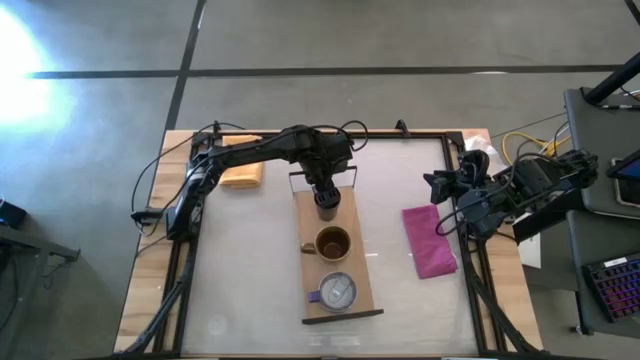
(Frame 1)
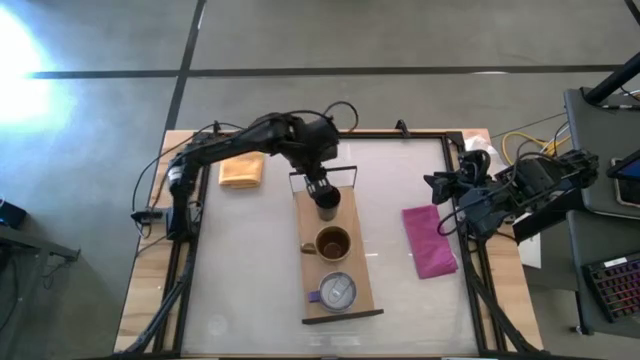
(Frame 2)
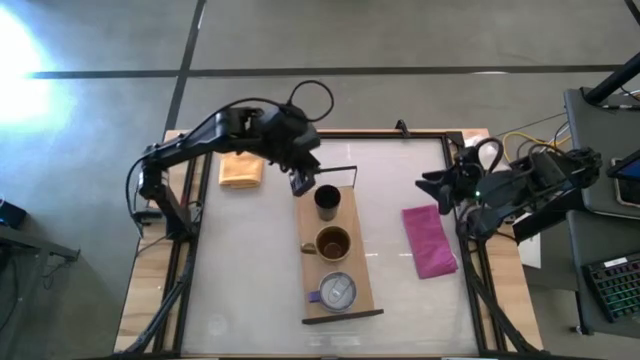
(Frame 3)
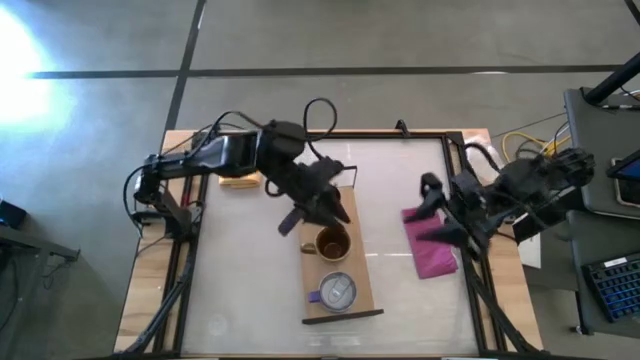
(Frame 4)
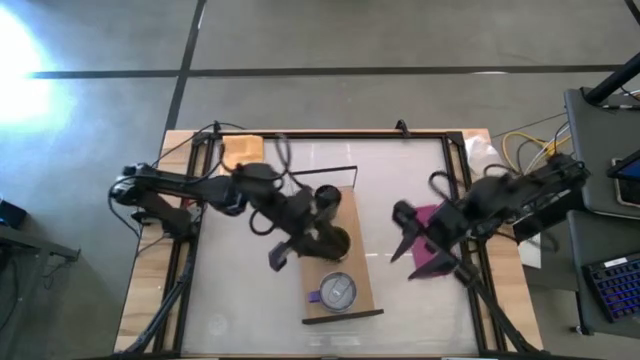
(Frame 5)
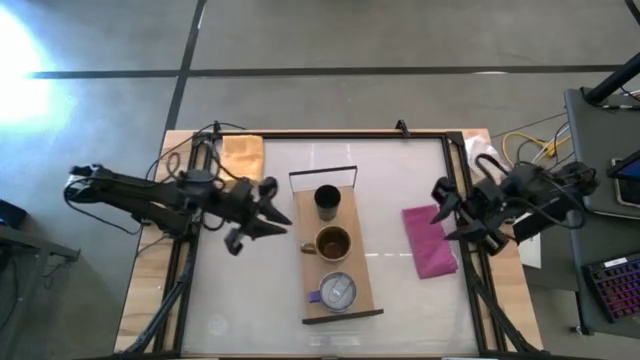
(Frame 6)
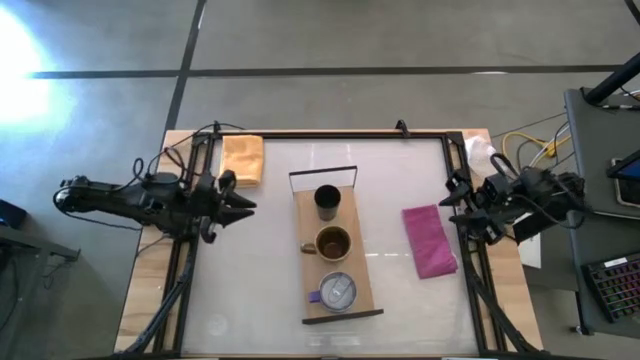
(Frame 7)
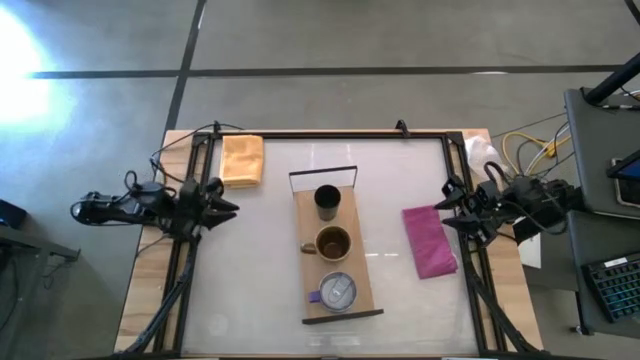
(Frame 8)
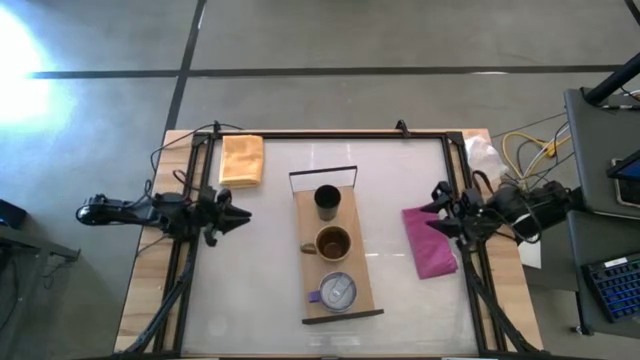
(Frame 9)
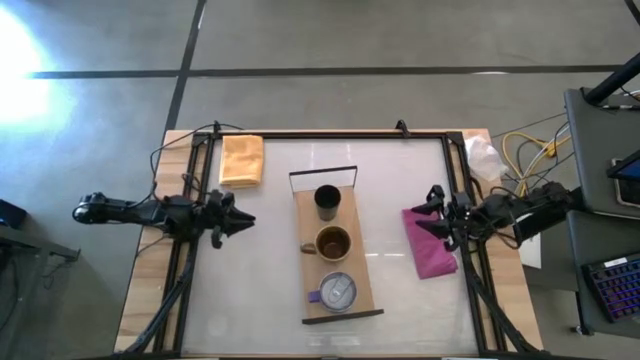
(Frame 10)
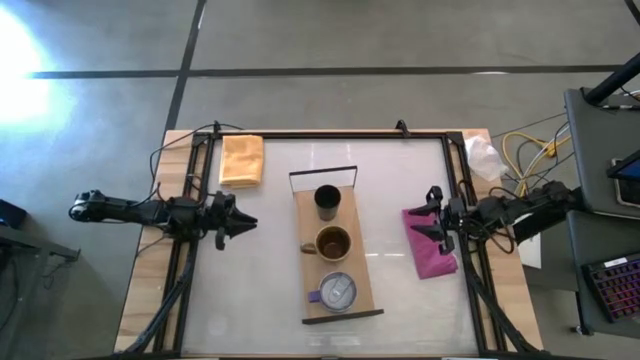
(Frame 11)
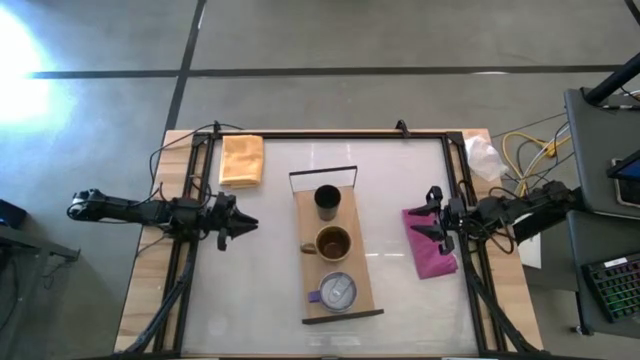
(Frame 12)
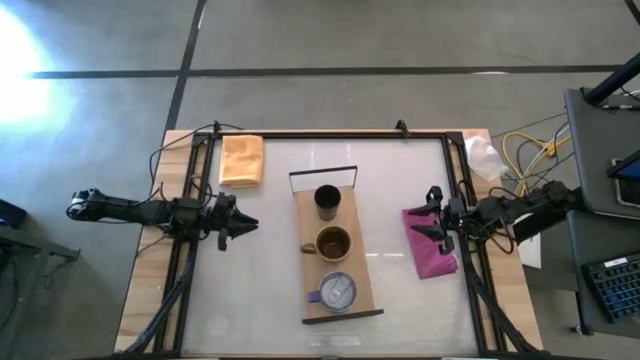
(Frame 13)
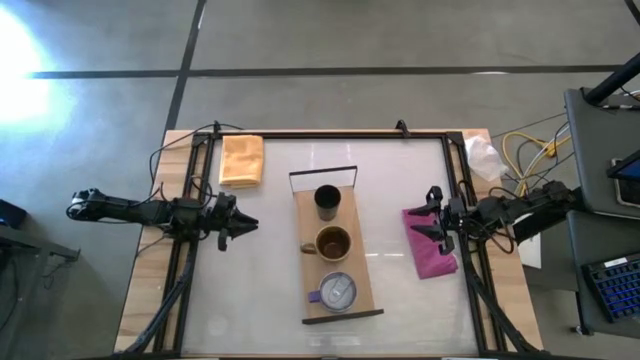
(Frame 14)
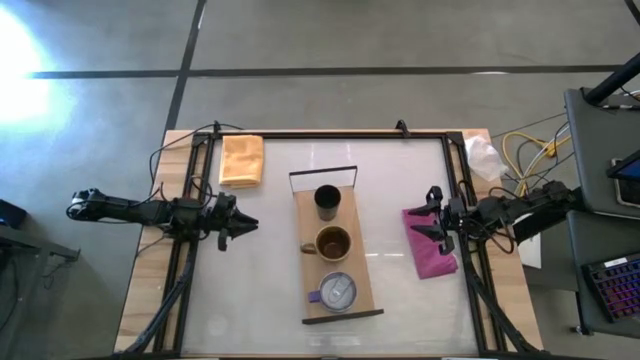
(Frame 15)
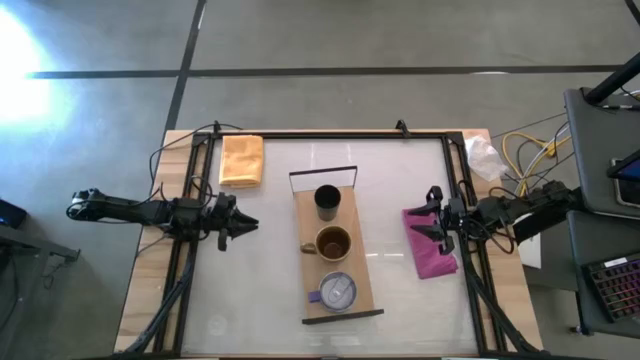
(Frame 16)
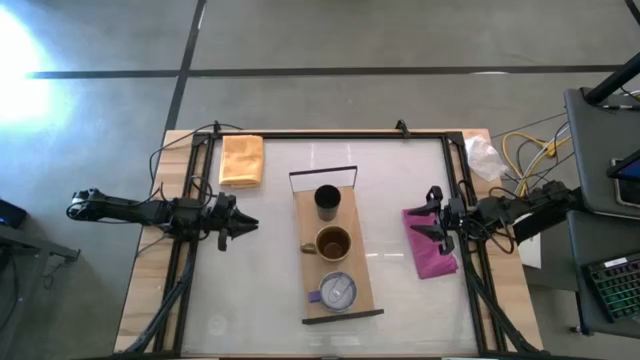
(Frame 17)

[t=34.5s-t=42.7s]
Task: Stack small to large cups/mugs on shelf
Return to Home Position

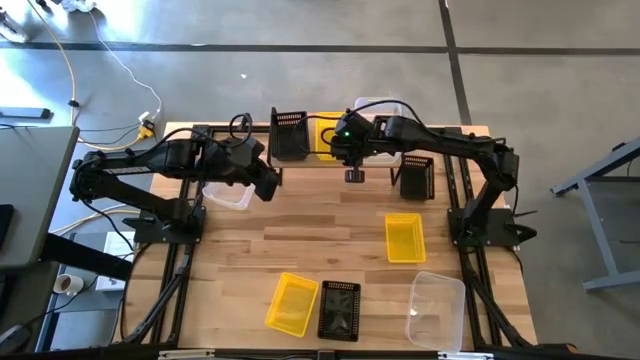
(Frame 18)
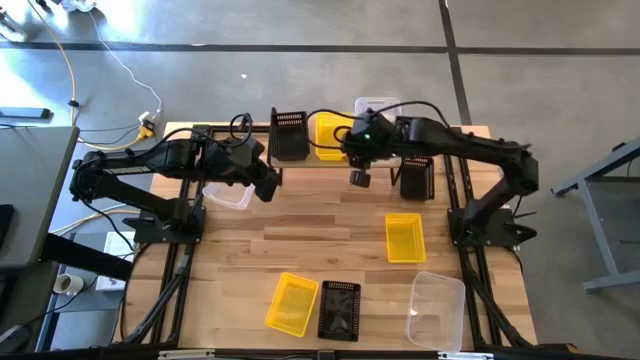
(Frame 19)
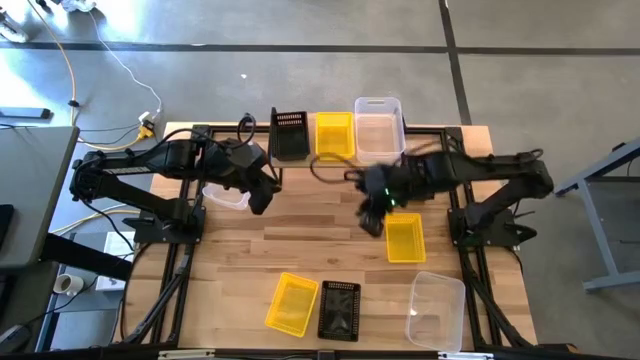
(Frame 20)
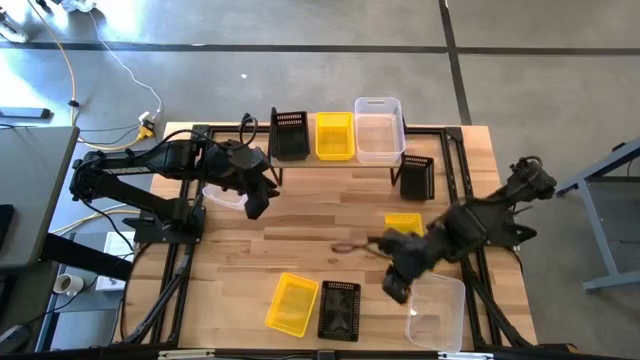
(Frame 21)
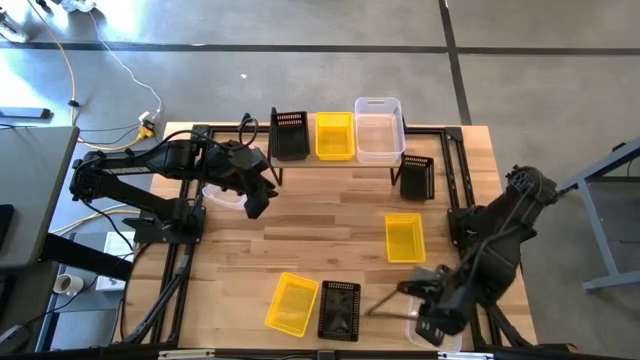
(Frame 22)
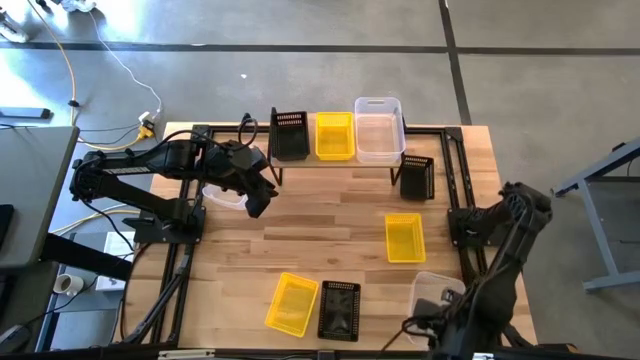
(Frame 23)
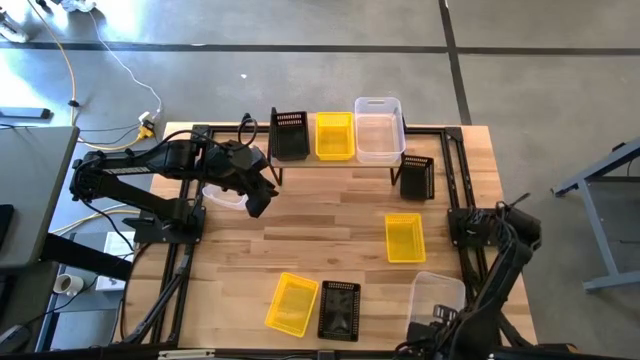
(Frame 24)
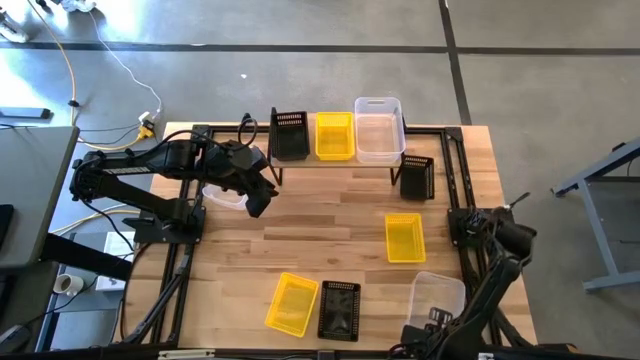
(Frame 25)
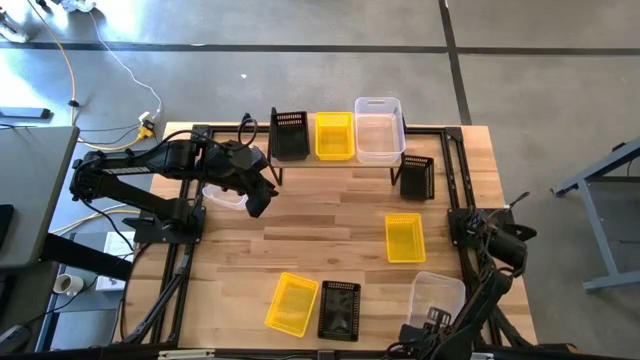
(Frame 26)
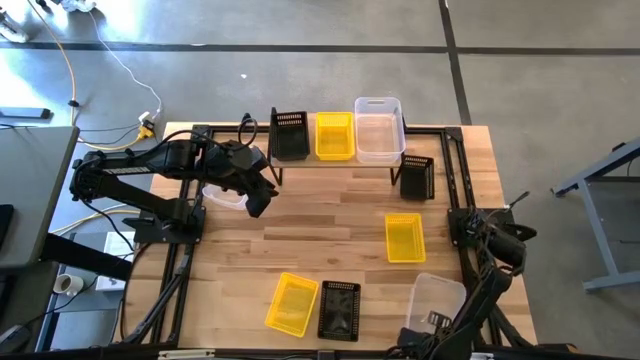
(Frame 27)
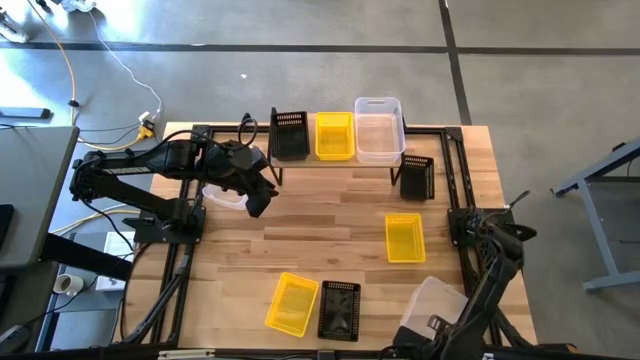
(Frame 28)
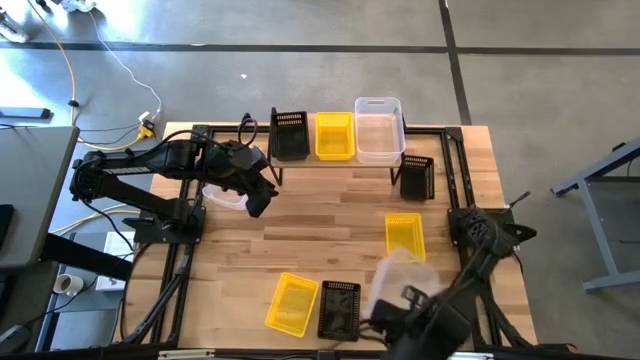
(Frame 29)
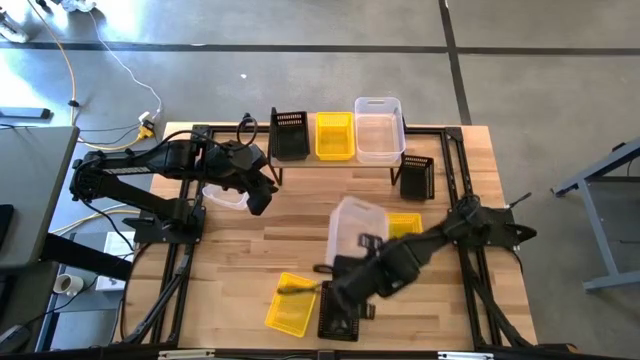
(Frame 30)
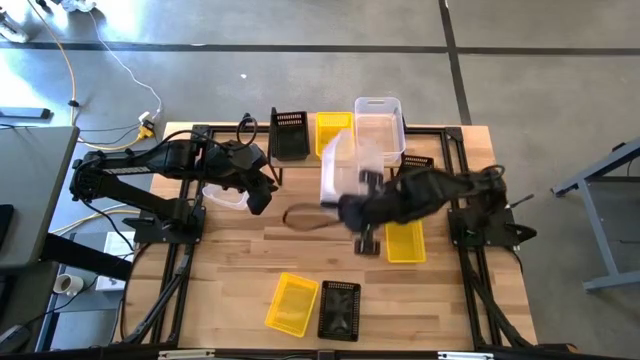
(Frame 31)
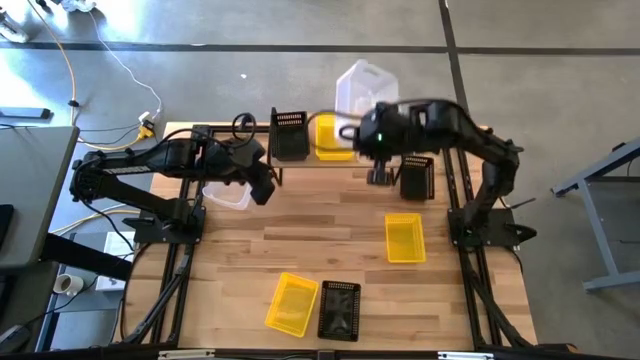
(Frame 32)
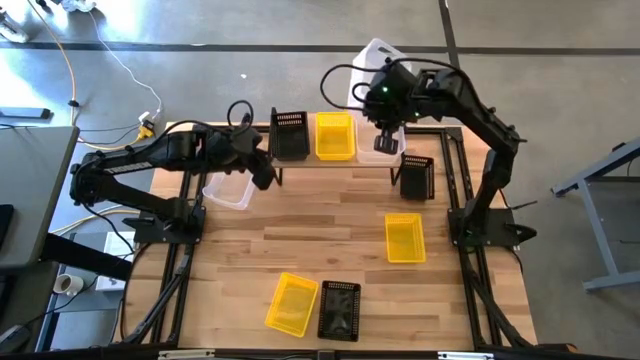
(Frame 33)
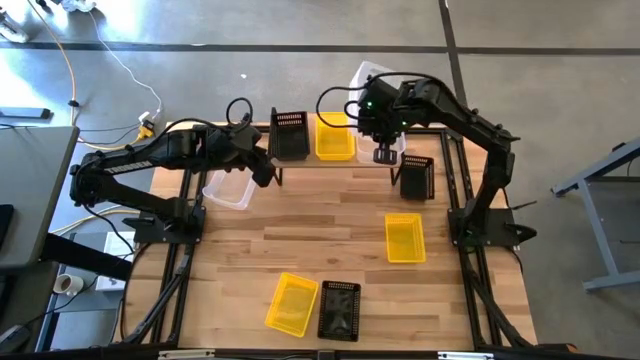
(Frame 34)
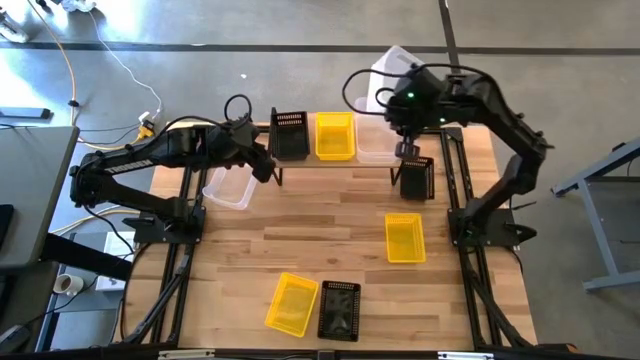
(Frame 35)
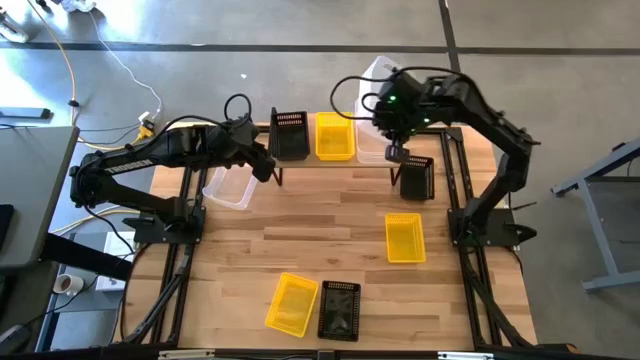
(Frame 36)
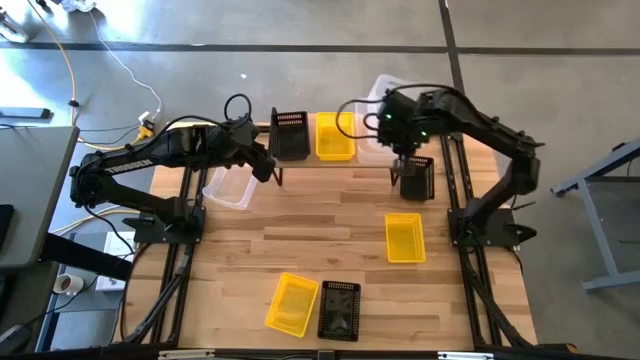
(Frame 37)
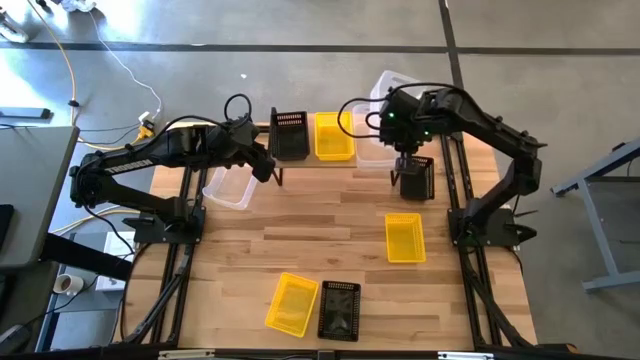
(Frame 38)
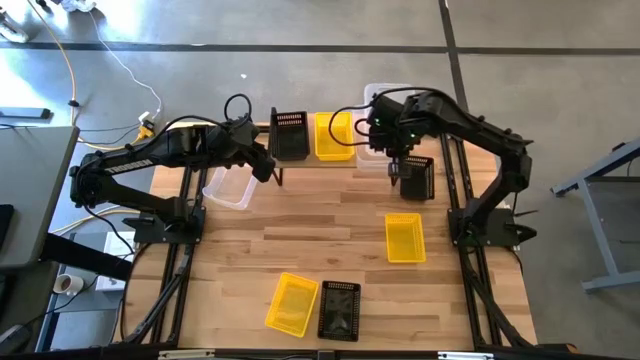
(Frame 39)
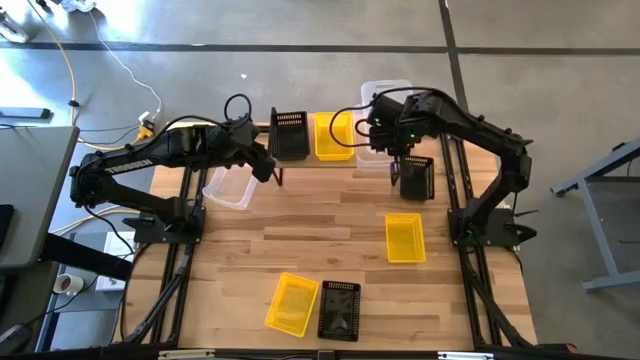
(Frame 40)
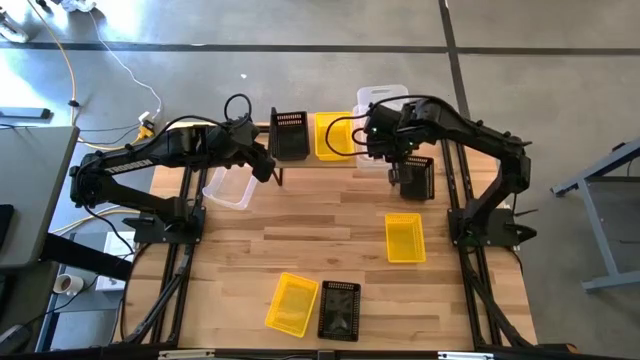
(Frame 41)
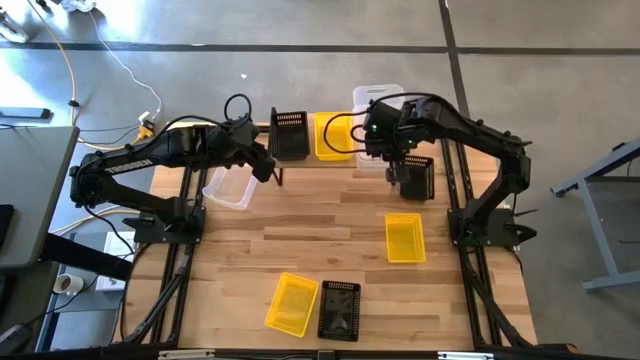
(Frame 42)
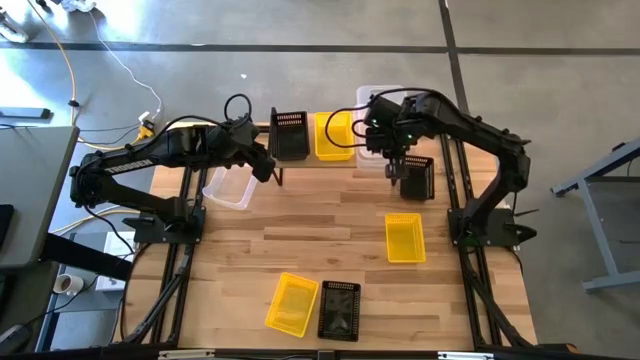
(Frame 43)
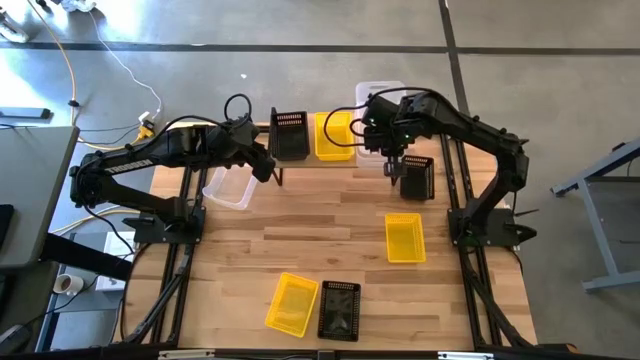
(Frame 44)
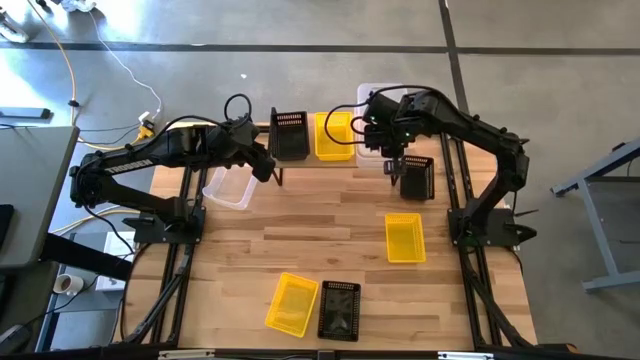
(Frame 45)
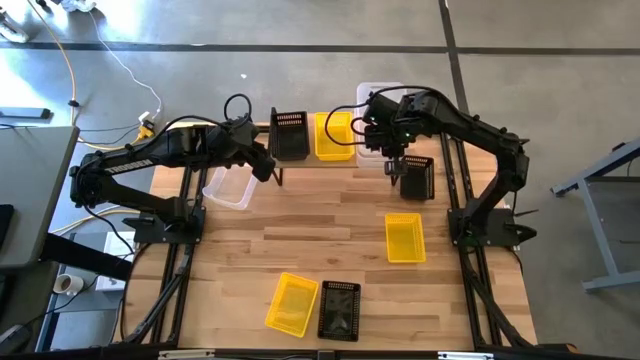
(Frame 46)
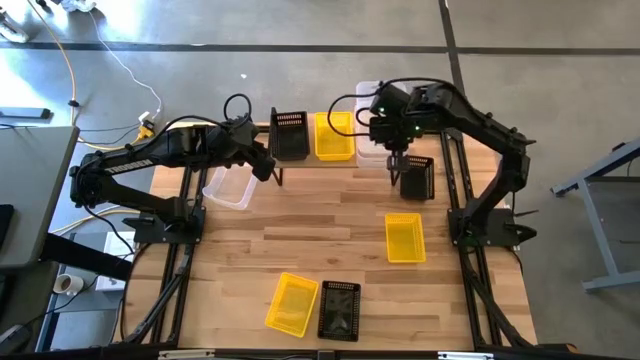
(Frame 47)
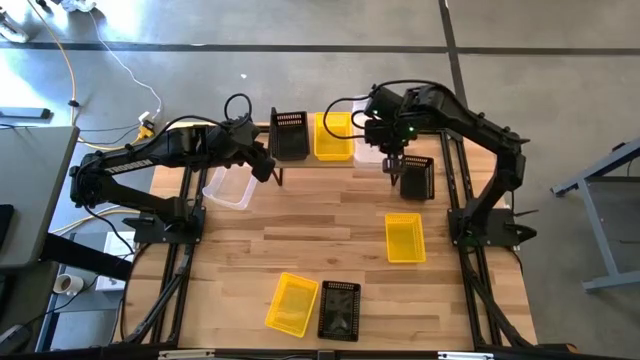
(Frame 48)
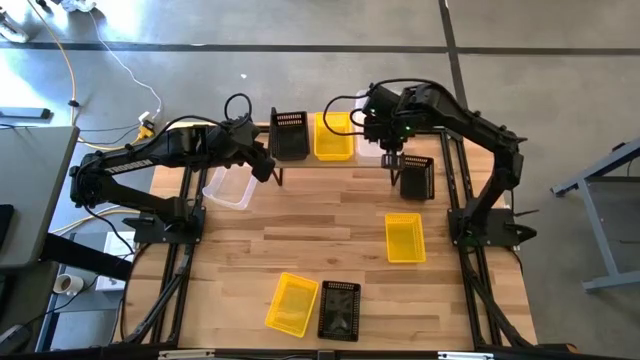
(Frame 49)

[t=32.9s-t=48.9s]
Task: Stack baskets on shelf by color
Stack the transparent bin on top of the transparent bin on the shelf
